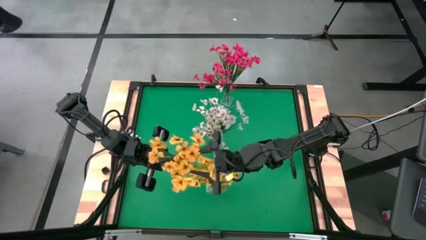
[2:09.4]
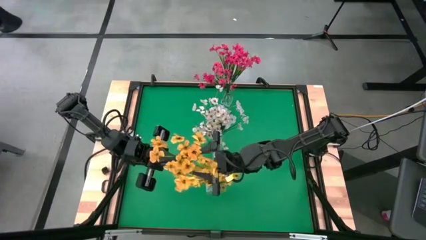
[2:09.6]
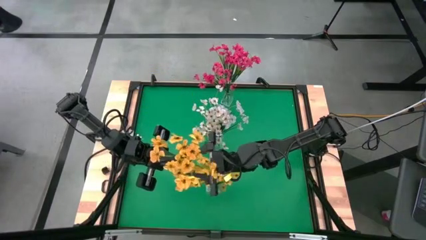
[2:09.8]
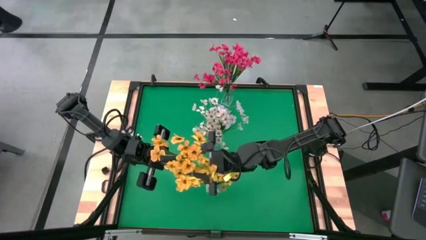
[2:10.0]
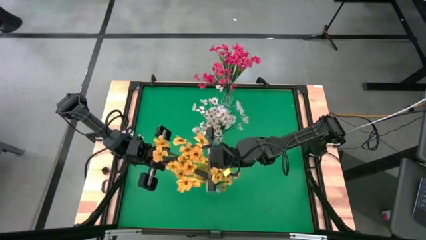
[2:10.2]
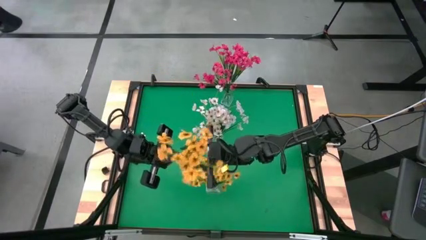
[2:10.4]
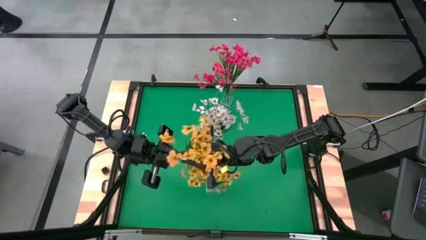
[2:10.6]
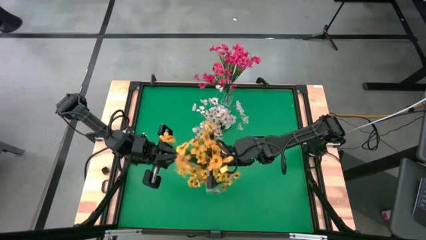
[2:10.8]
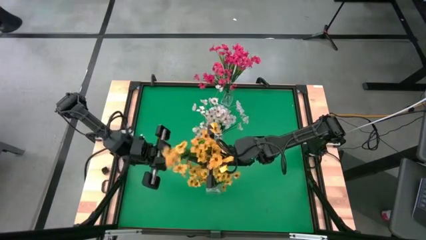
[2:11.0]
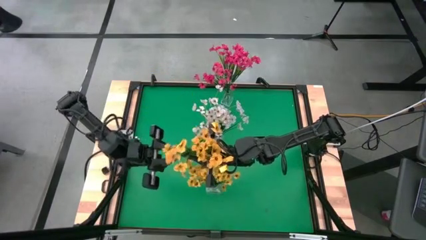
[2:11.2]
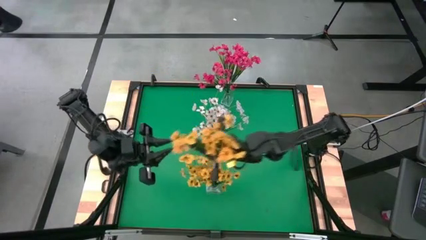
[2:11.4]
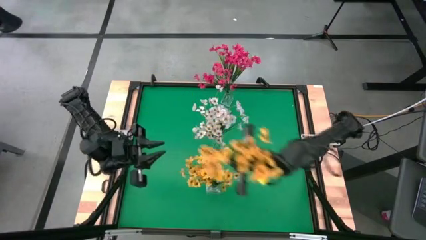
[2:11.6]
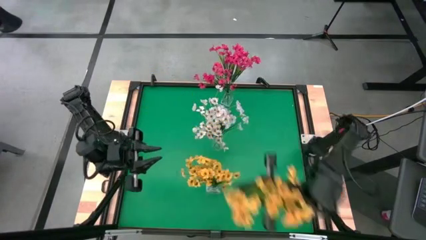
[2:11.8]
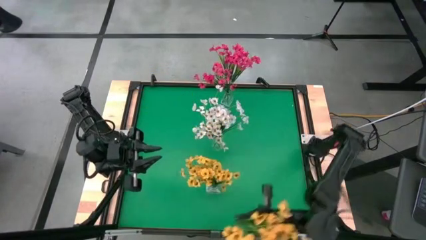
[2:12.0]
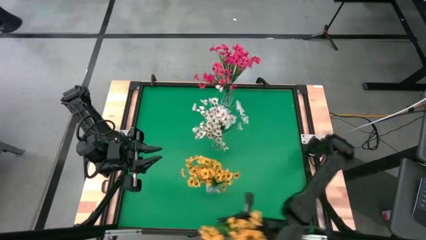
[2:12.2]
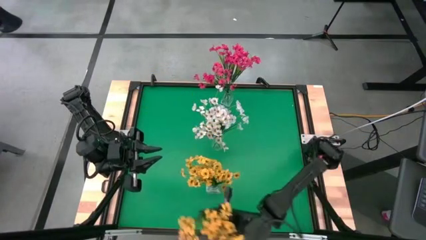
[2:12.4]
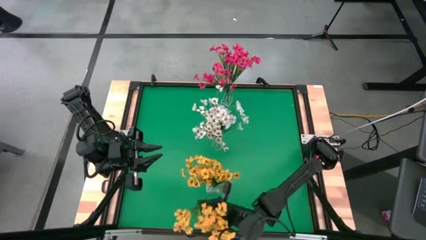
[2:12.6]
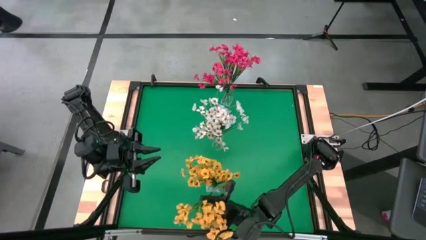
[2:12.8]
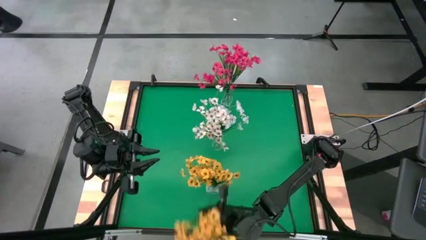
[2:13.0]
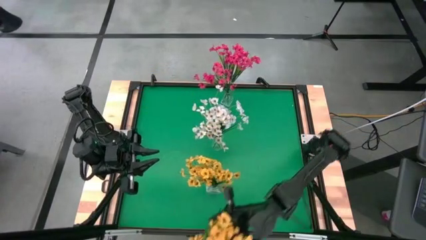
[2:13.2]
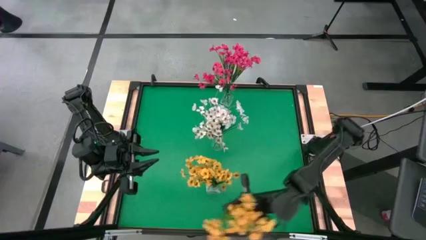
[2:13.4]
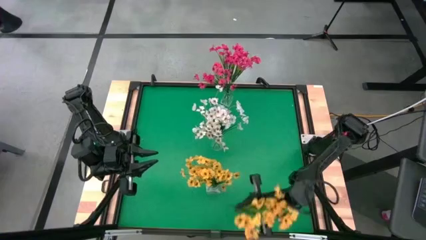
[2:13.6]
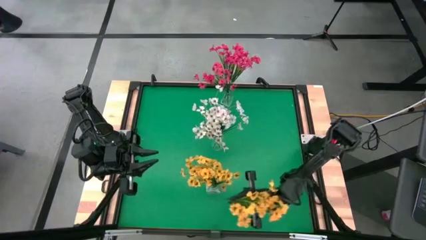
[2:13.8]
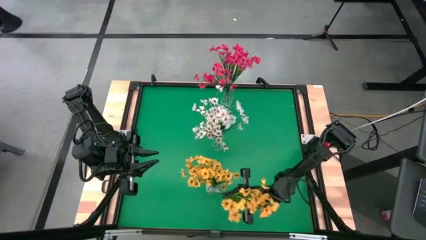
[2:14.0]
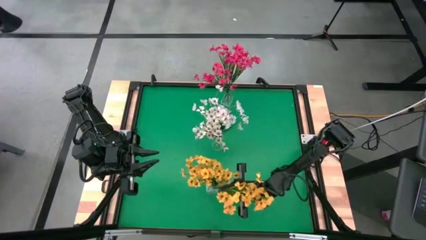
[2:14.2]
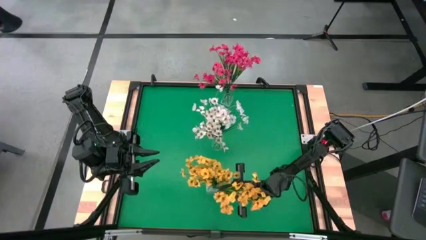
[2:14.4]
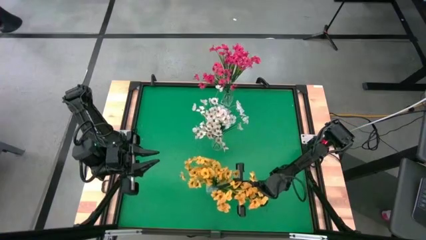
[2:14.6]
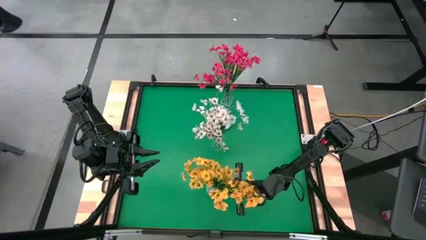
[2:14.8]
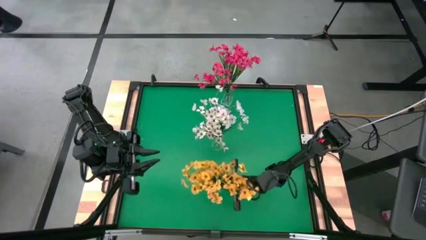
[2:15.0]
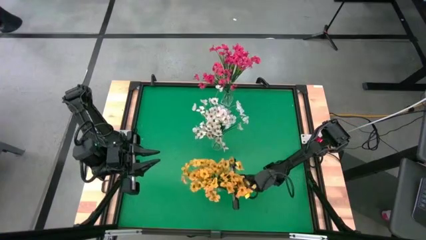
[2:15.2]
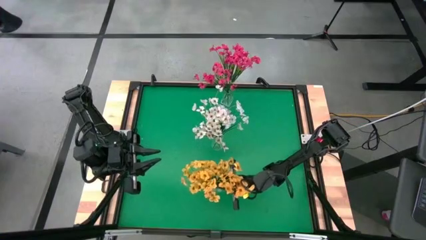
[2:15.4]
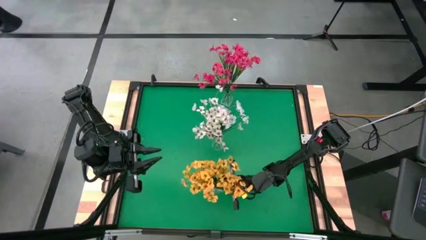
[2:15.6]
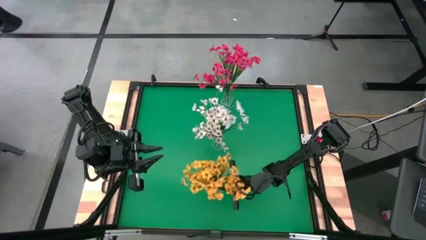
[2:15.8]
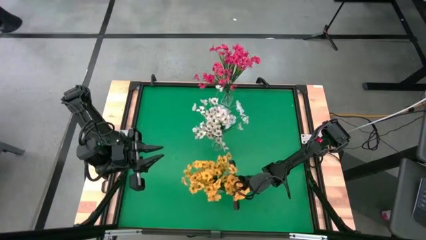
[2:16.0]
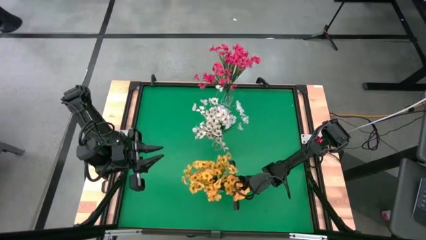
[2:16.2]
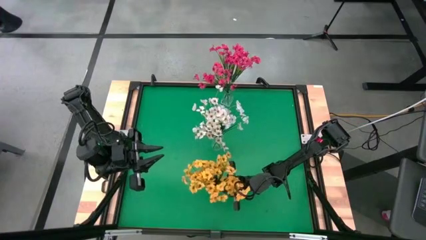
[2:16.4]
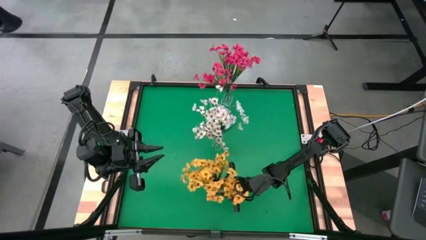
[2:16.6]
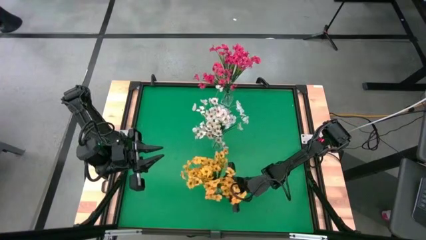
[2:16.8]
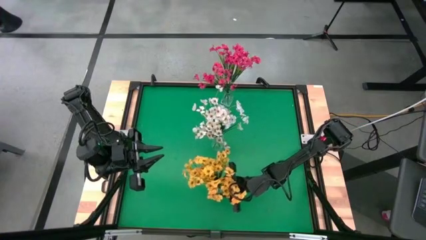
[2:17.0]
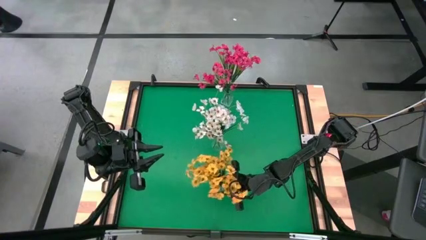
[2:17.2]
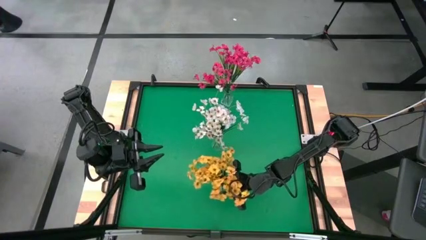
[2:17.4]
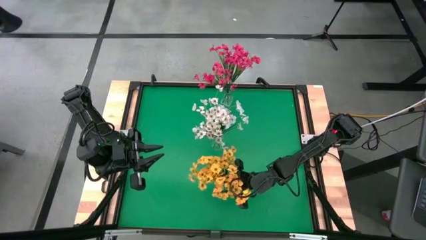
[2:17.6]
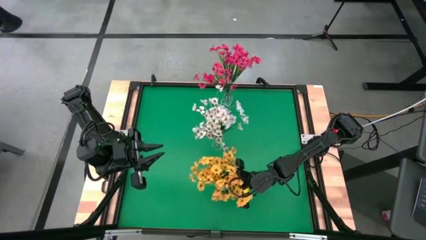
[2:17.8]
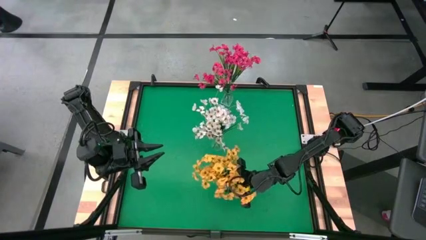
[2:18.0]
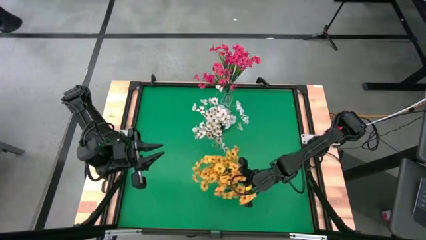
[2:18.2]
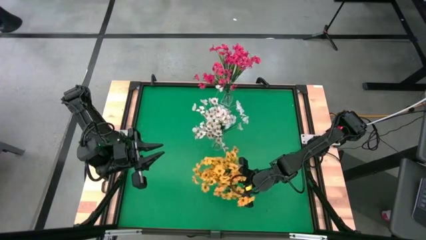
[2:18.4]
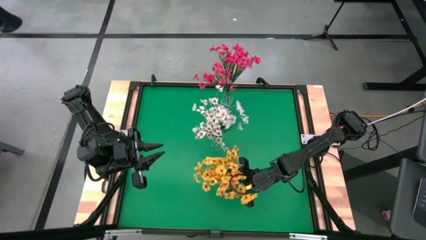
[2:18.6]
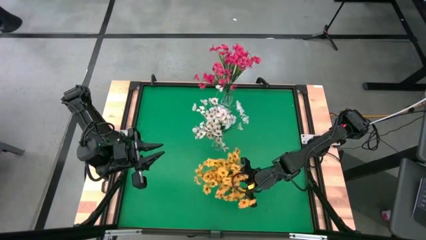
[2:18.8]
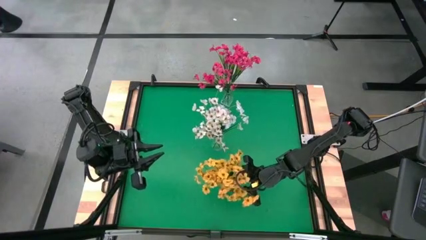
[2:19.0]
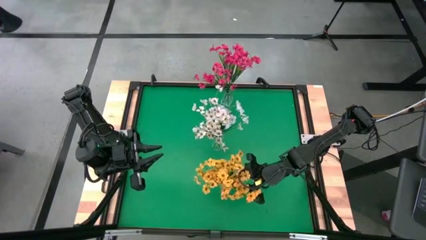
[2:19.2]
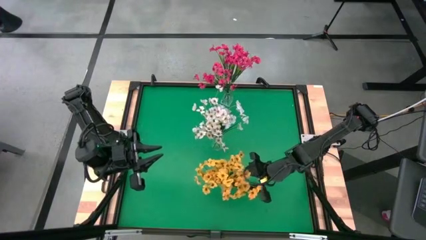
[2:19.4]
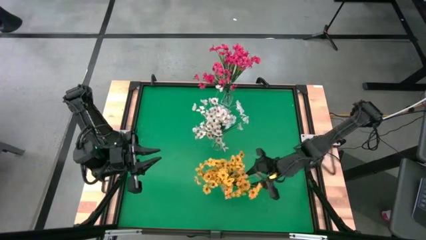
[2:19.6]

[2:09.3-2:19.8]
Task: Sort flowers into vase by color
Put the yellow flowers into the bottom transparent vase

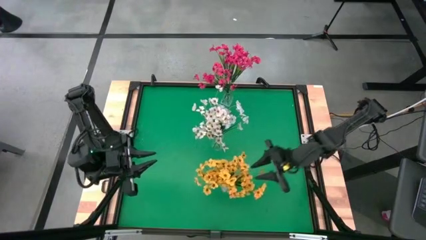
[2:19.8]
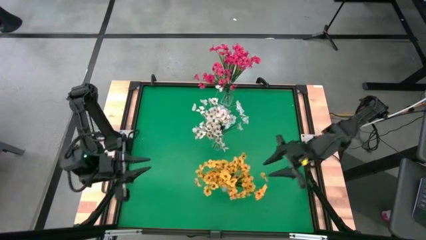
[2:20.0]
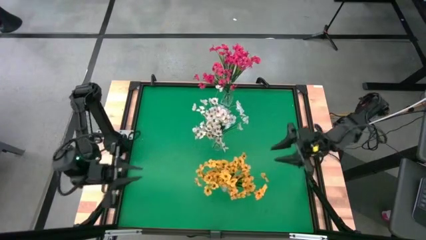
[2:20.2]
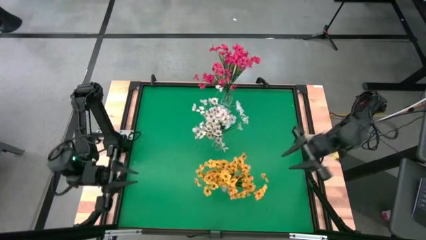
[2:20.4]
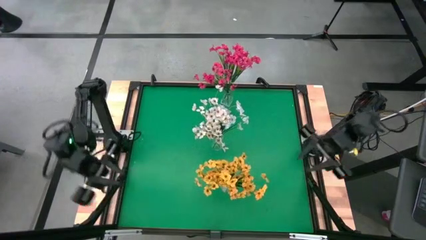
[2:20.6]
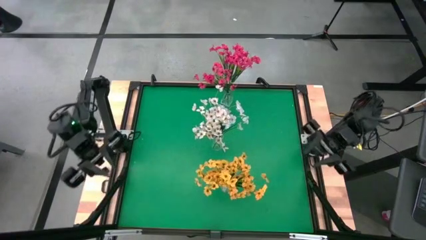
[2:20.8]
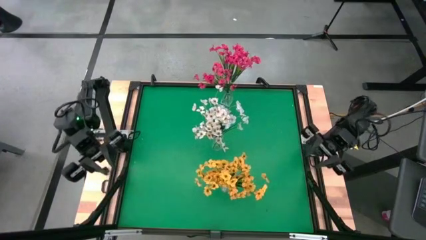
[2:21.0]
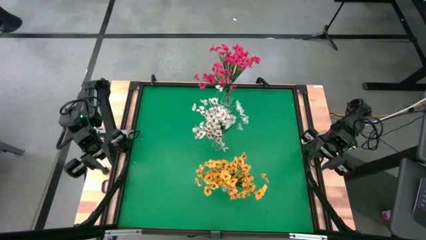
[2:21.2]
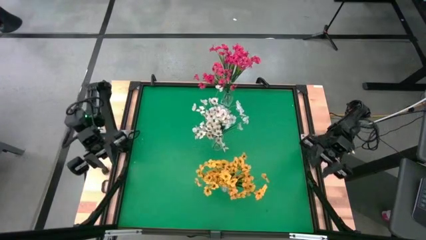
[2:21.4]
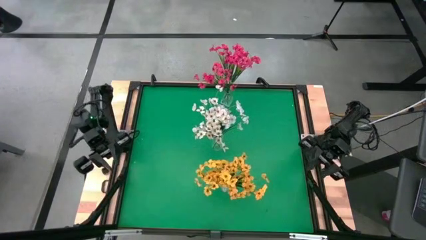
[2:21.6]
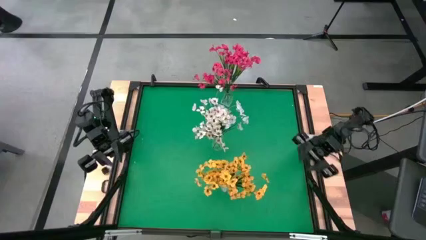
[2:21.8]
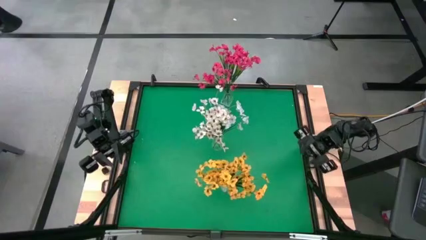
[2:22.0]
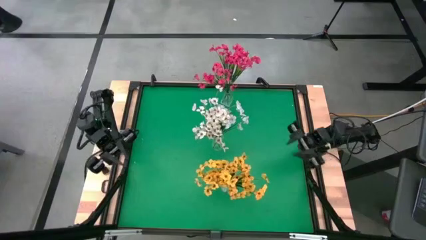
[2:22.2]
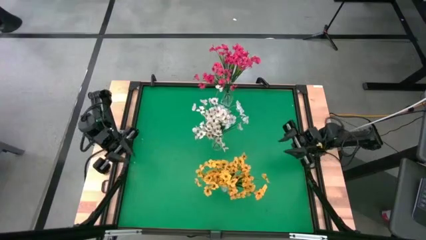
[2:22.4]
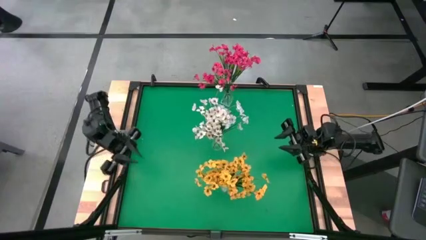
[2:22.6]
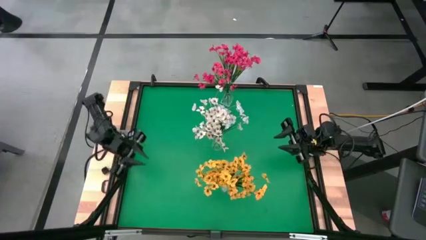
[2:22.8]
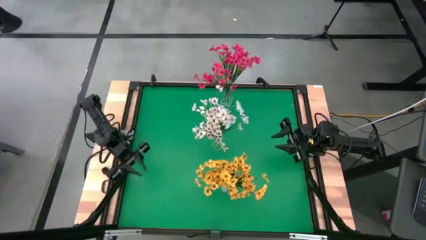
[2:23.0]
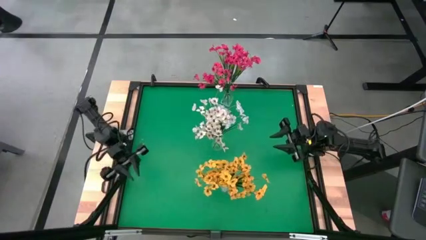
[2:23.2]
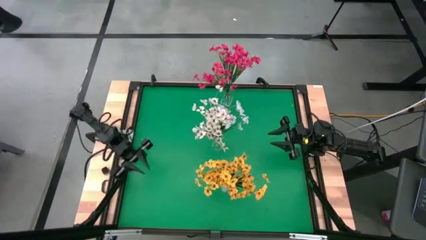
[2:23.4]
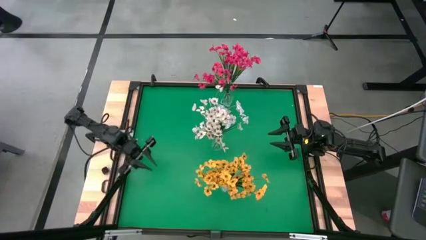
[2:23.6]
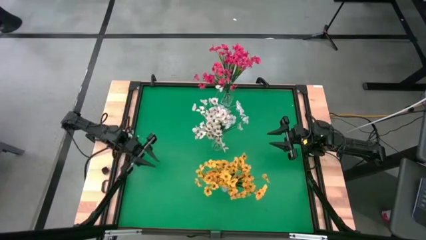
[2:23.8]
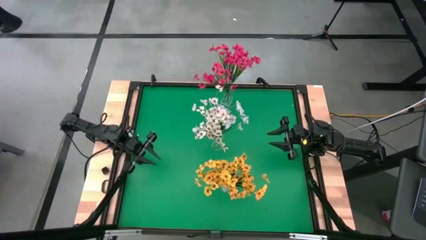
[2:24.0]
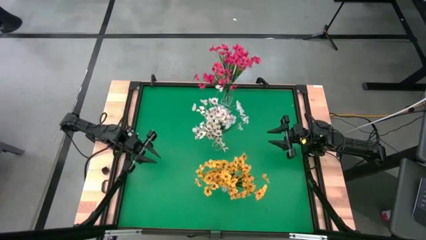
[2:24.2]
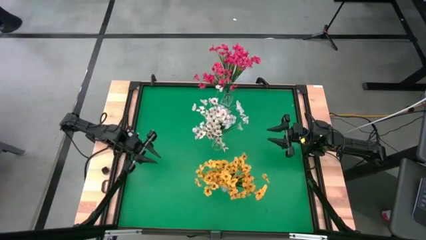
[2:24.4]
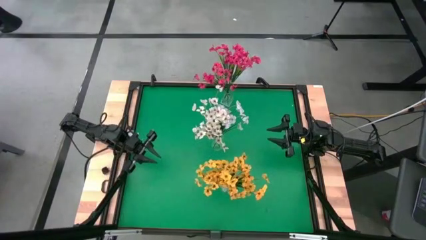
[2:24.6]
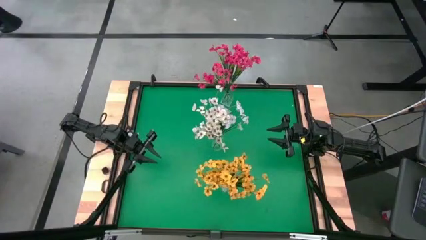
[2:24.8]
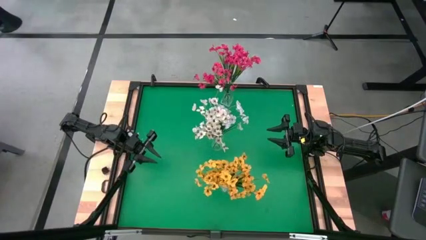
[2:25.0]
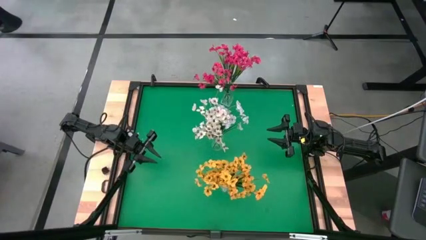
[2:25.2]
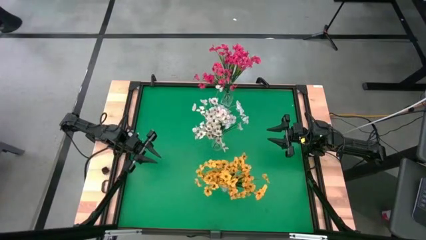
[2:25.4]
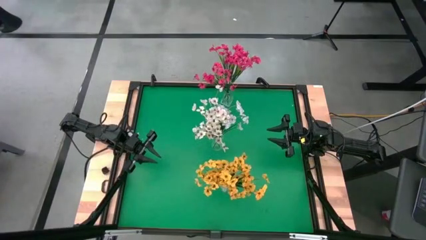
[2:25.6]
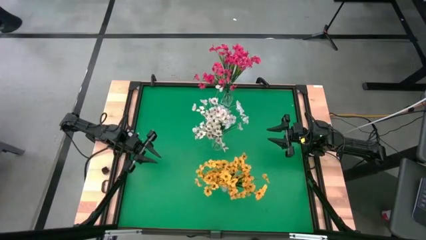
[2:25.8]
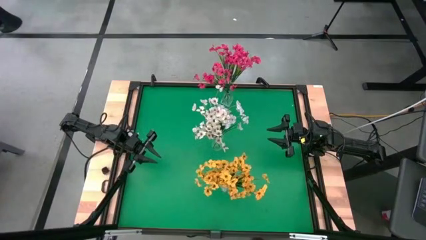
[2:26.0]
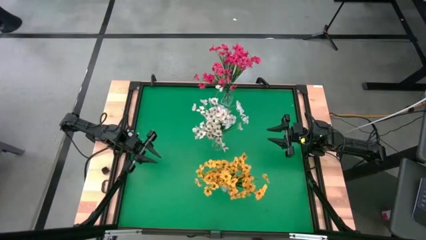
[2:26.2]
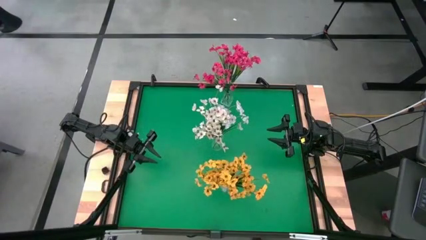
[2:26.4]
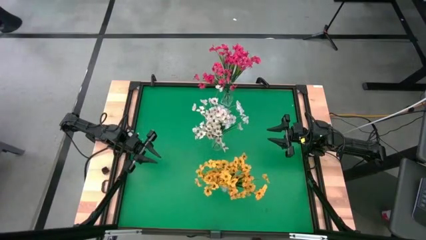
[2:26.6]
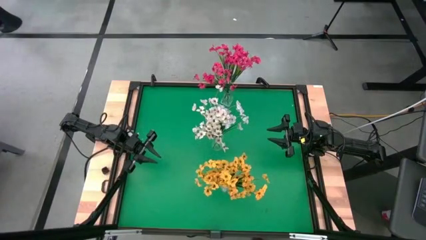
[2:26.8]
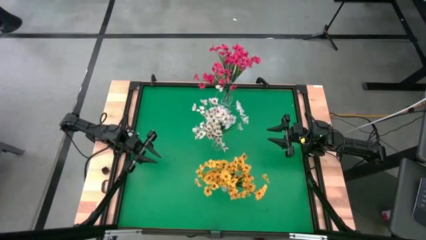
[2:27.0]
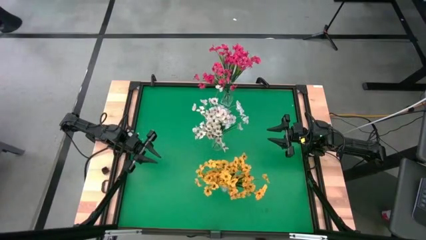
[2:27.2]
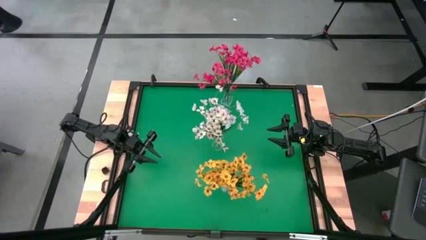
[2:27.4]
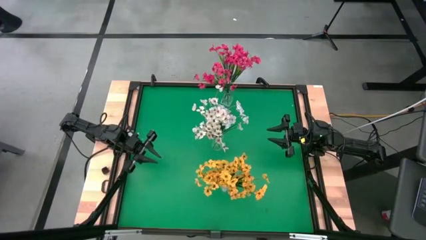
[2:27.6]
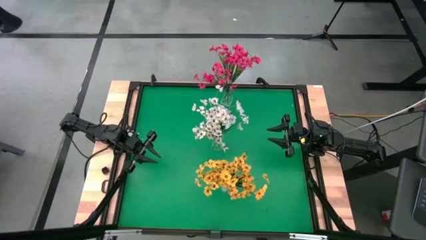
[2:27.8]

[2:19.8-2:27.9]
Return to Home Position
